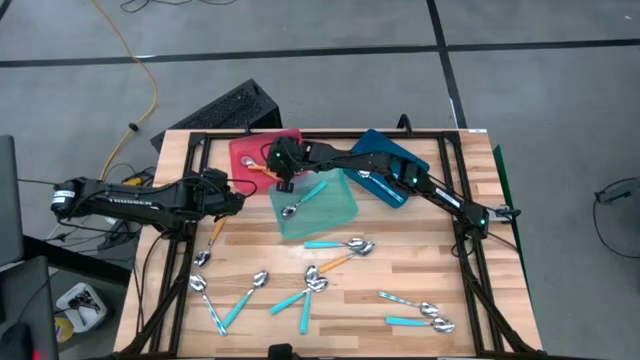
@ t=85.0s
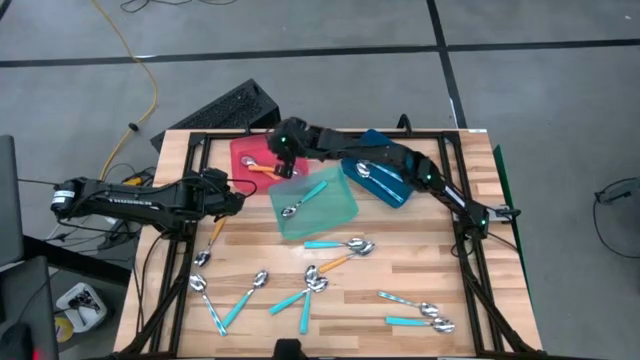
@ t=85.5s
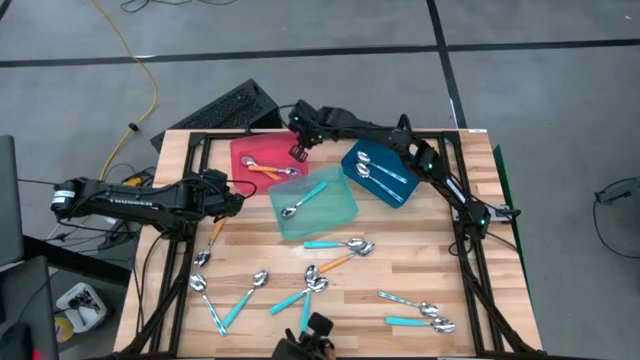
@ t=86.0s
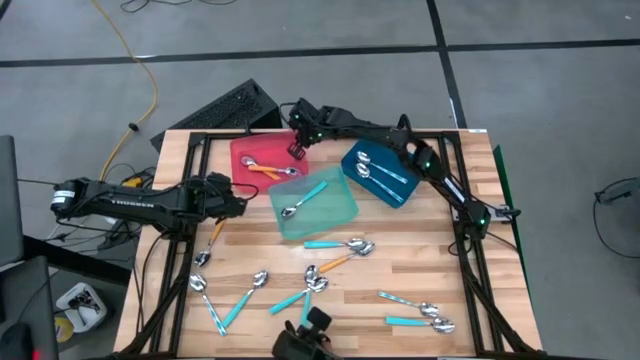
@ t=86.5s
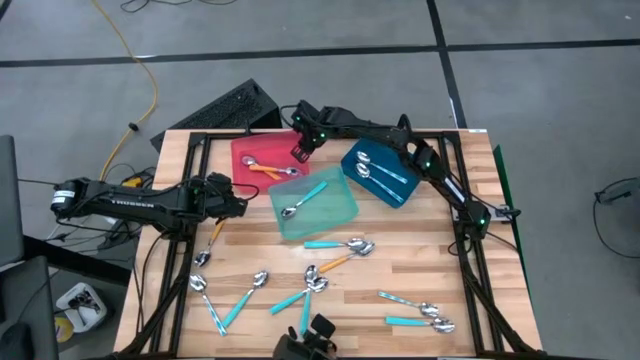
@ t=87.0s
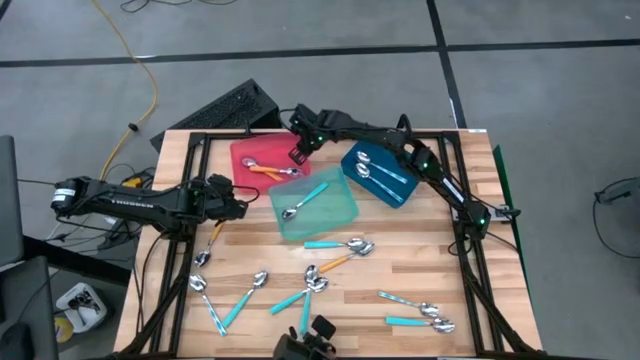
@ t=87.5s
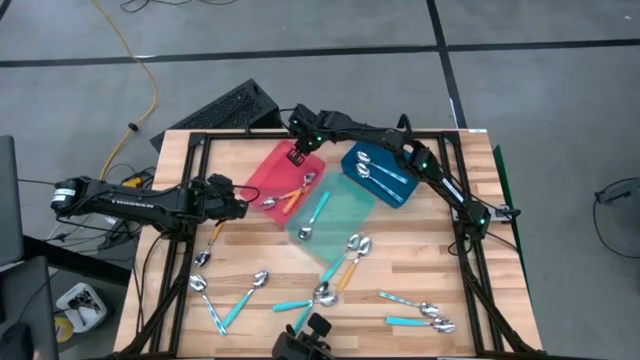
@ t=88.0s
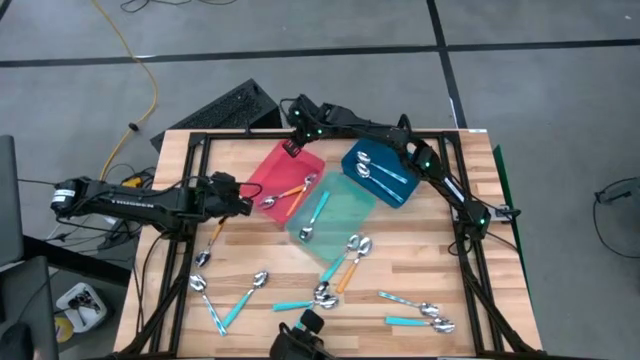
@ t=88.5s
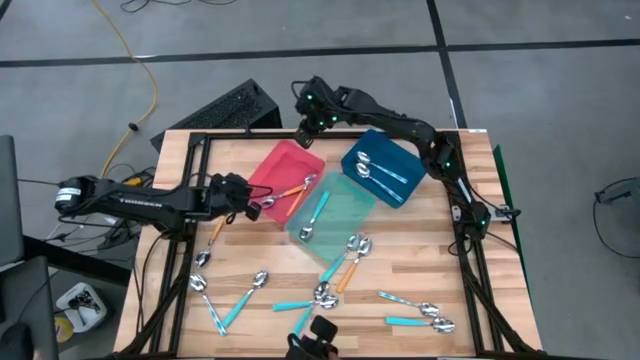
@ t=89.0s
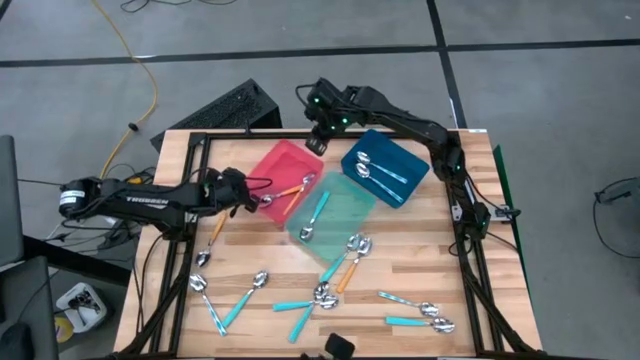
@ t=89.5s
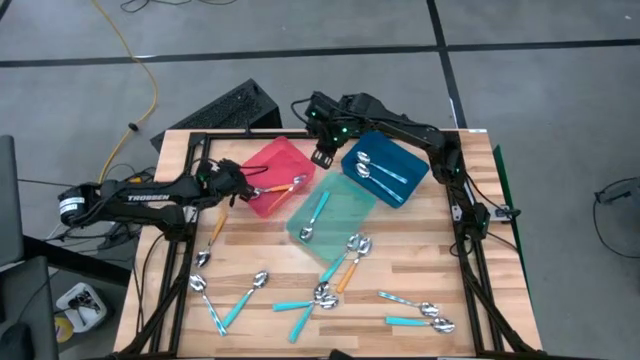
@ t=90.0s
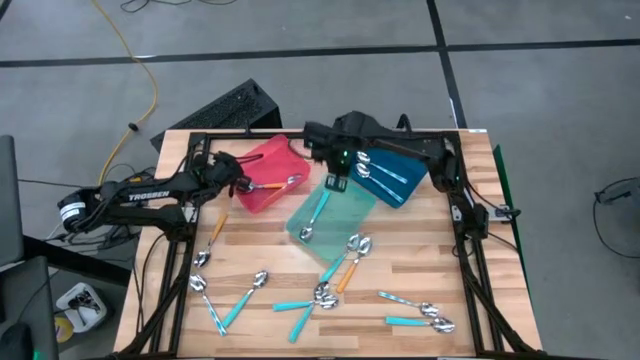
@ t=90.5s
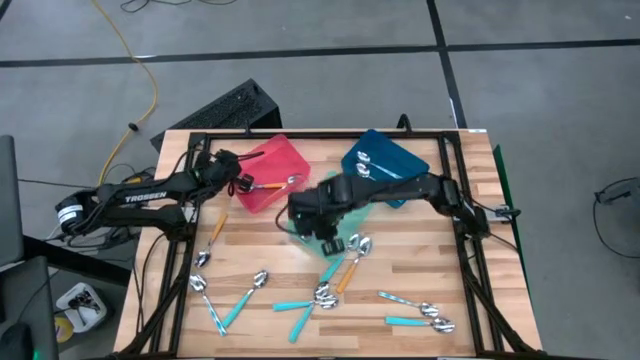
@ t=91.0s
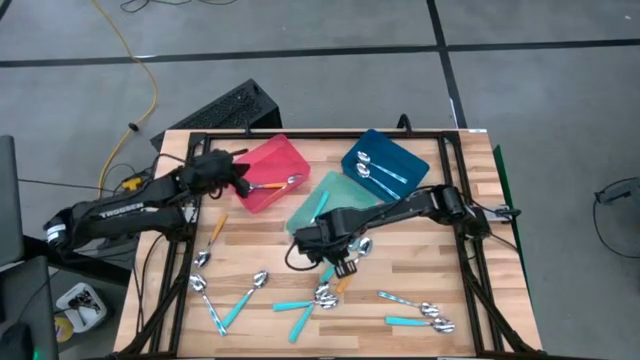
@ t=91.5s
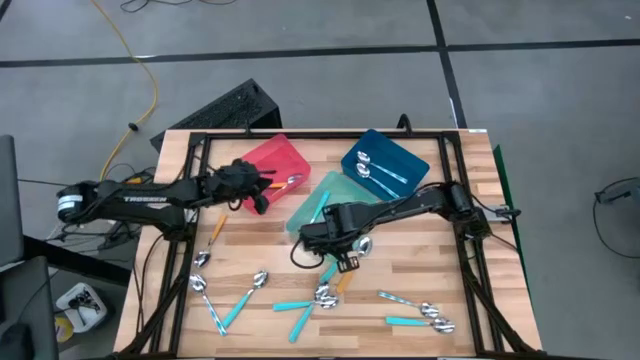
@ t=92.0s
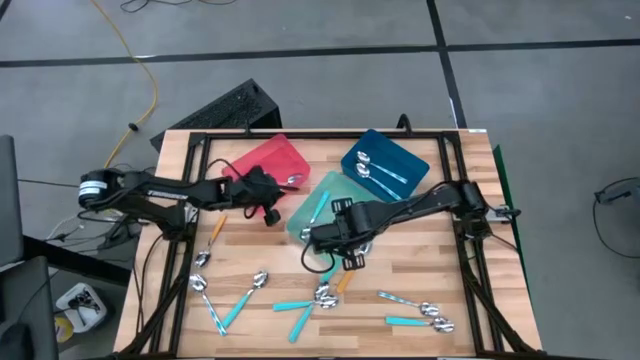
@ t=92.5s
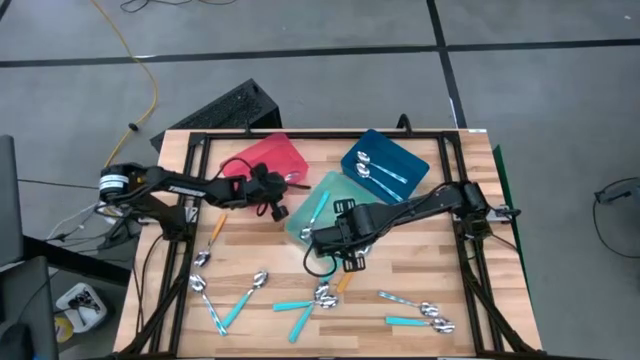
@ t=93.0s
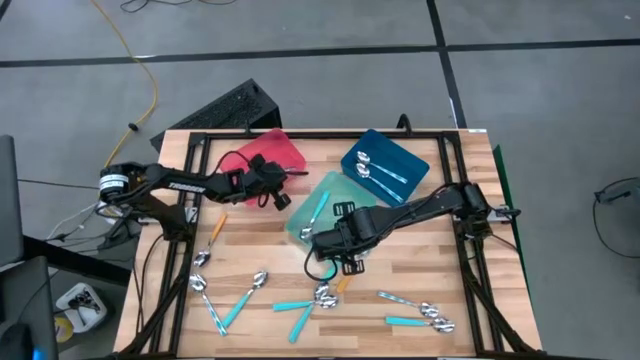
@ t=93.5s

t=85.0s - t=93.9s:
Task: Sort silverware by color (type)
Adjust the red bin

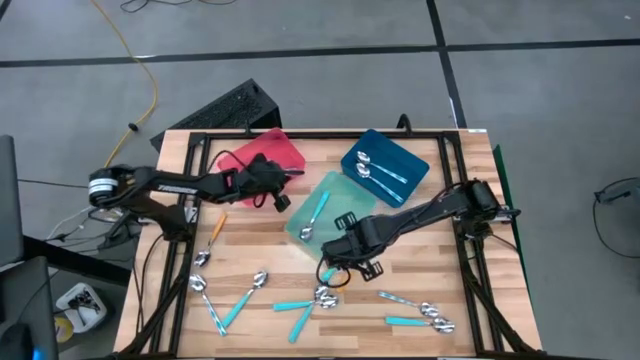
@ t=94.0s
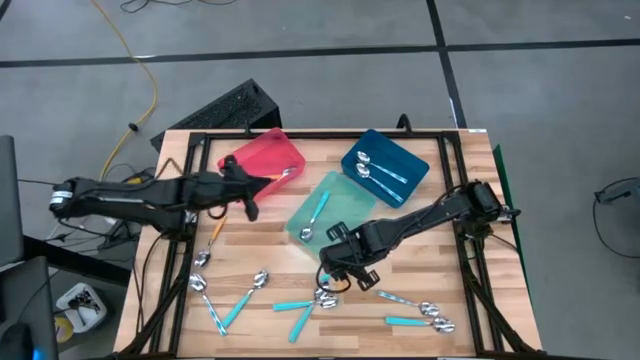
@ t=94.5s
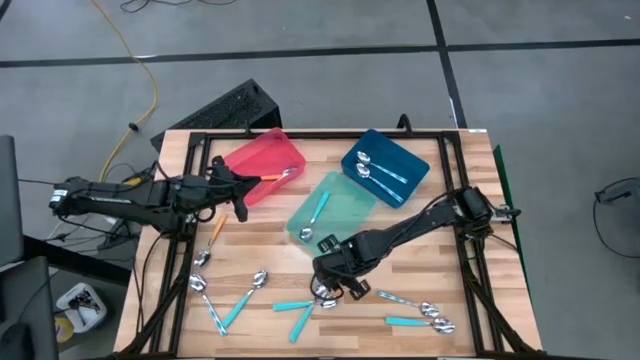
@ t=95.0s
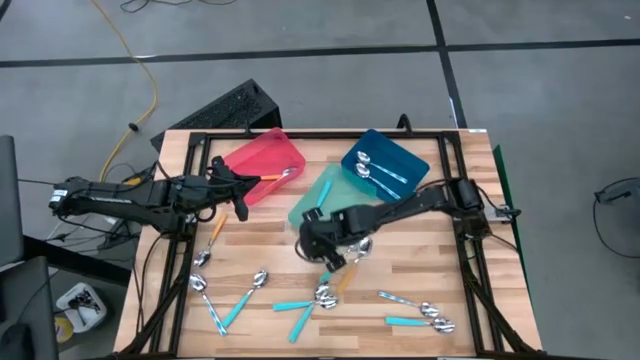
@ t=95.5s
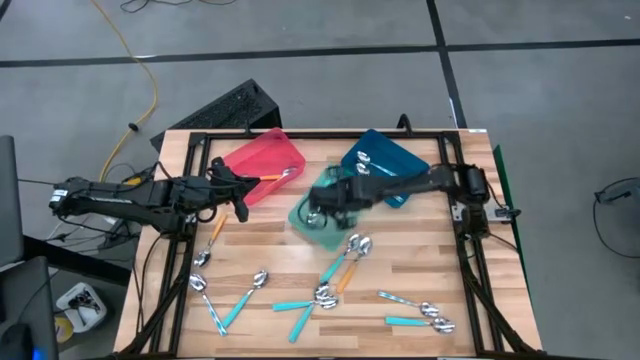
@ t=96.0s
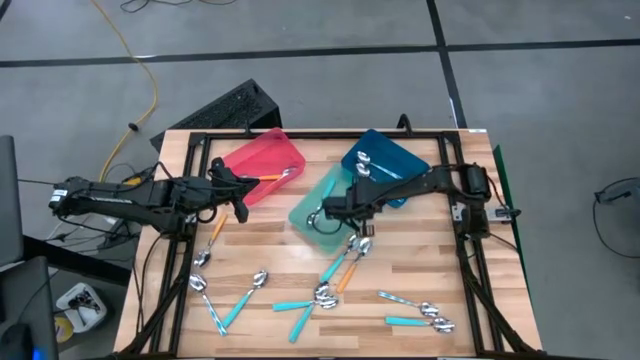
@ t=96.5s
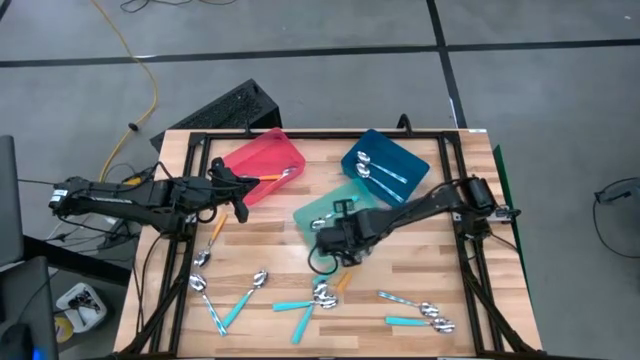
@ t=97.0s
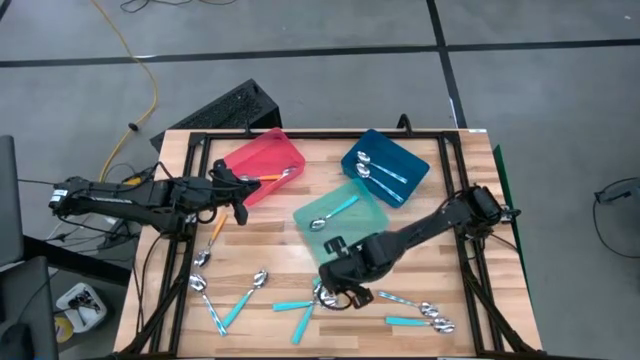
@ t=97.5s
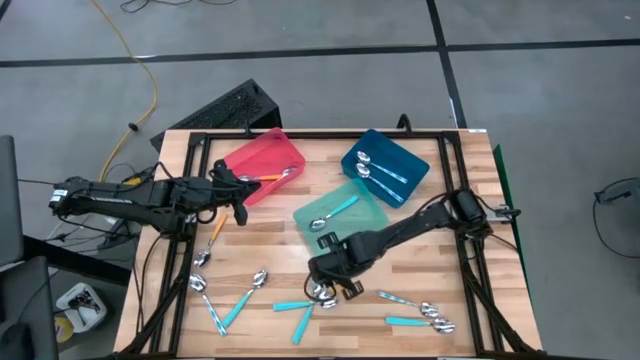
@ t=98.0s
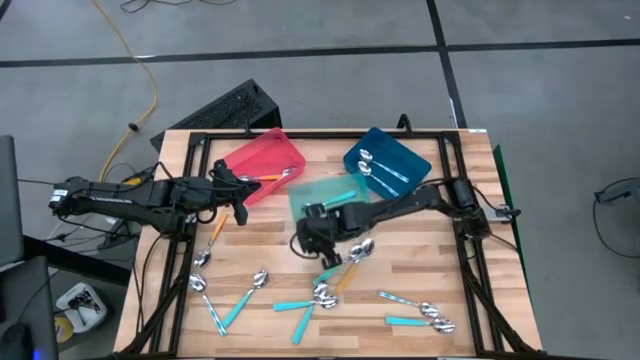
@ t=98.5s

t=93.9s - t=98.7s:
Adjust the green bin

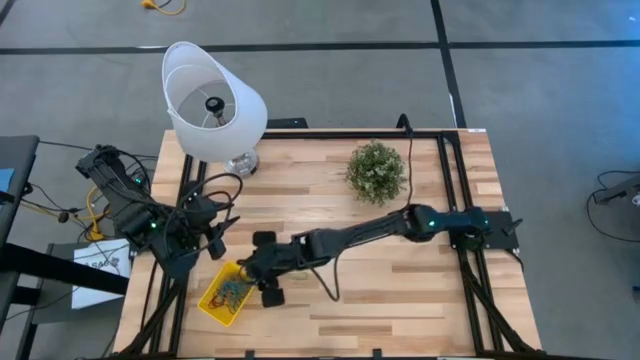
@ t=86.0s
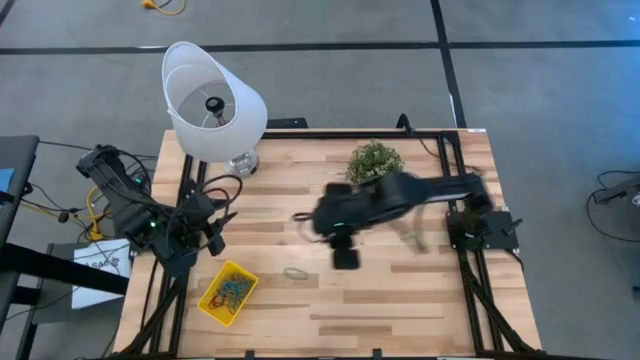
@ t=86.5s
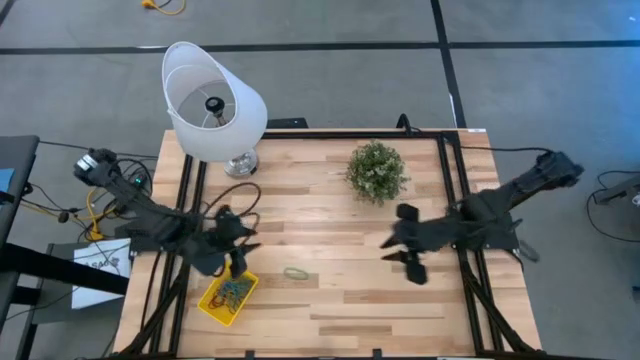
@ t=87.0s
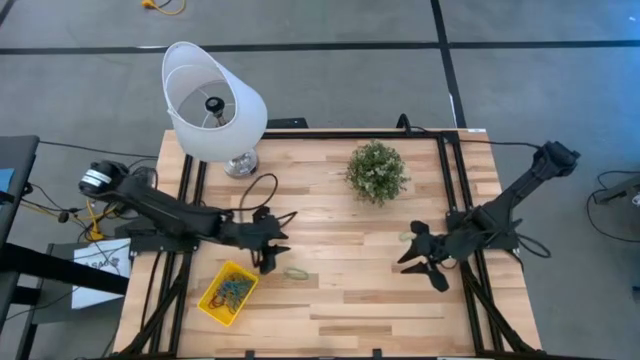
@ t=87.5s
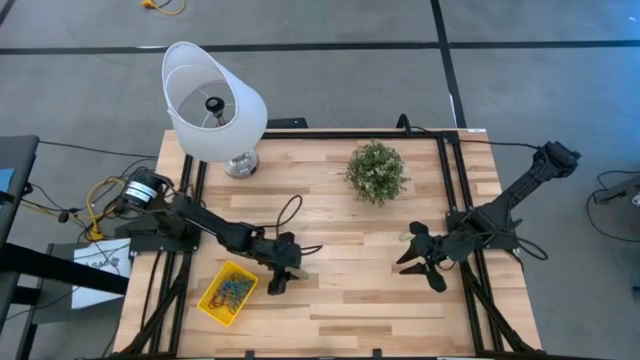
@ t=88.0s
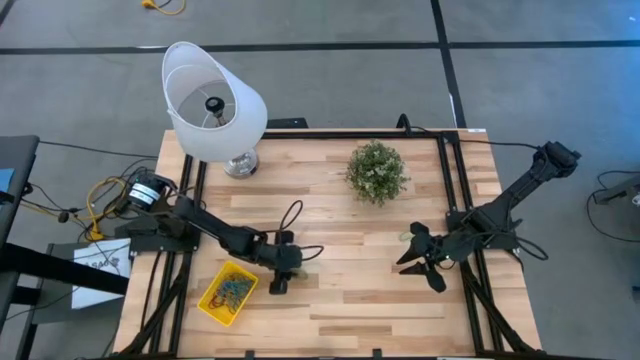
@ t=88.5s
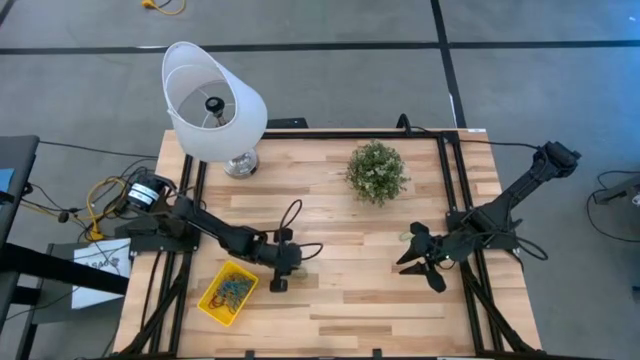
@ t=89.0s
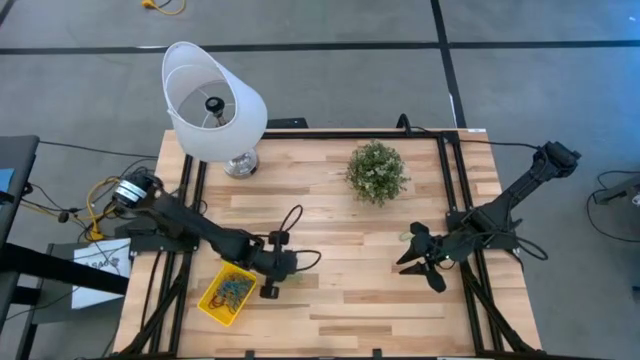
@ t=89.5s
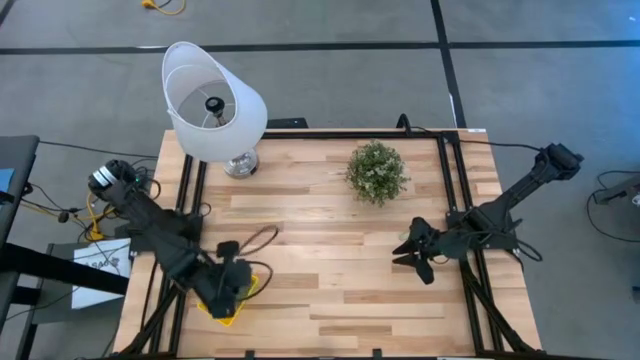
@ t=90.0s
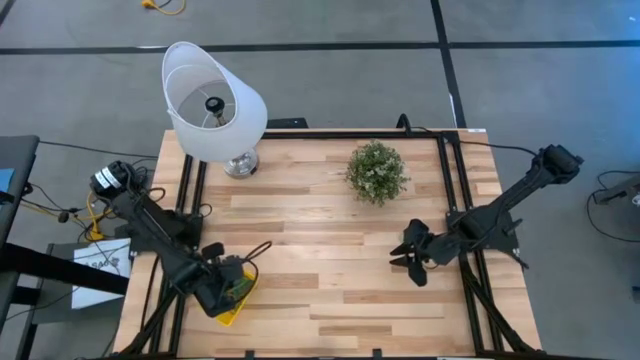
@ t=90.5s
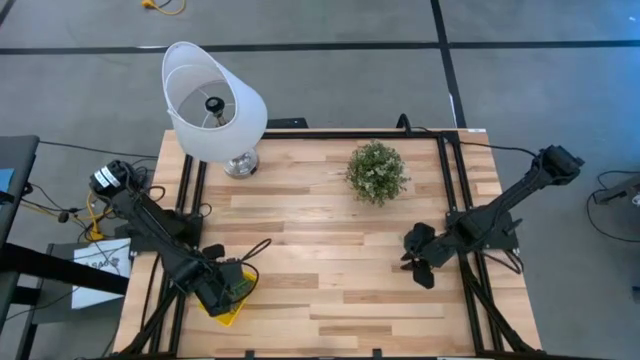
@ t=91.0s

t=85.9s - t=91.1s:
Task: Pick and place items into bin
Put the left green rubberband into the yellow bin

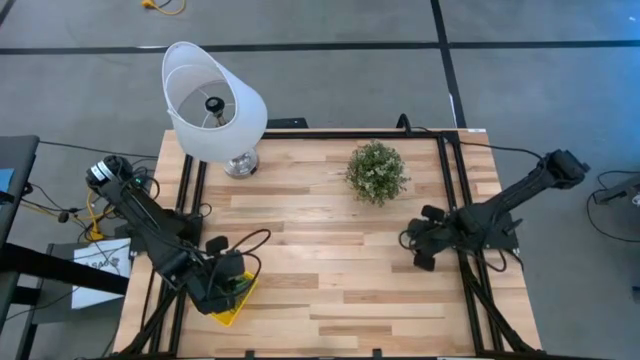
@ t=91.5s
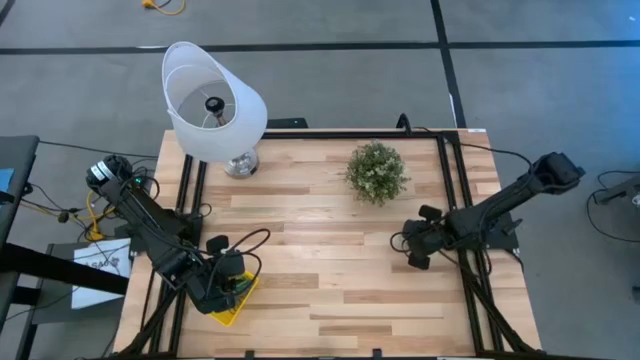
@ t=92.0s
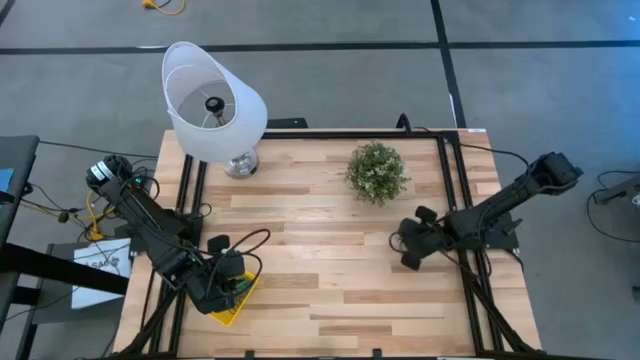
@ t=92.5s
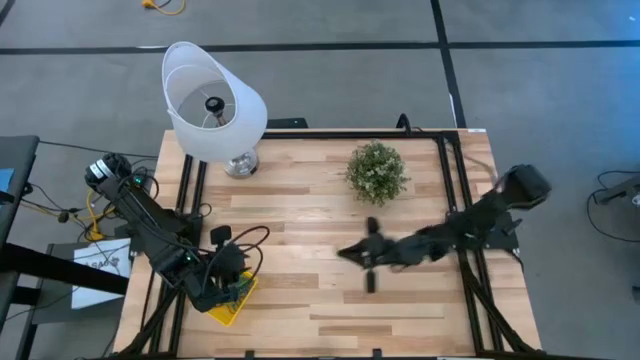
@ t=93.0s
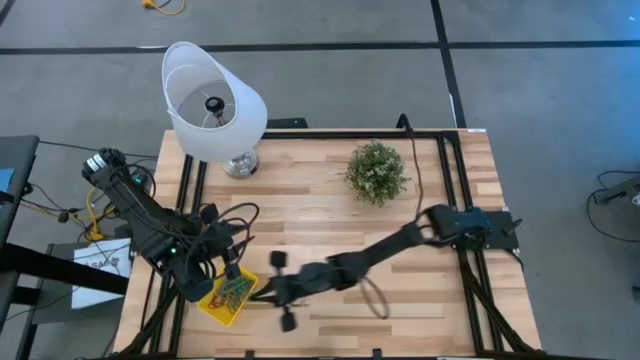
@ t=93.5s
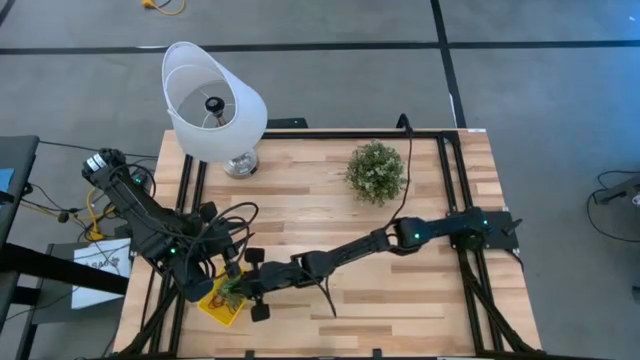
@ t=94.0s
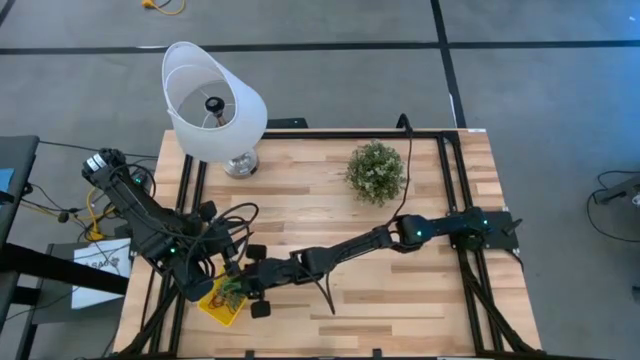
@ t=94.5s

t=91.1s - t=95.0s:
Put the green rubberband into the yellow bin
